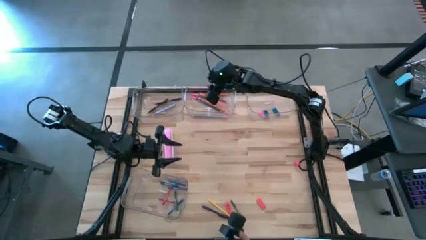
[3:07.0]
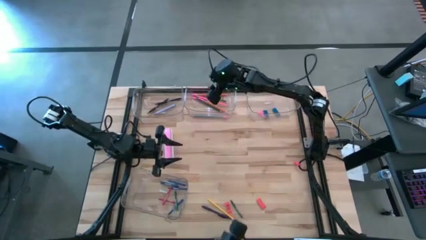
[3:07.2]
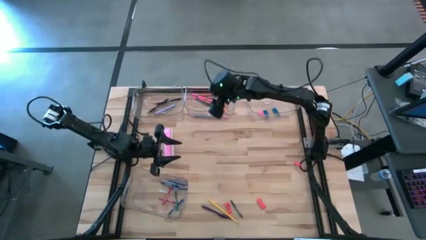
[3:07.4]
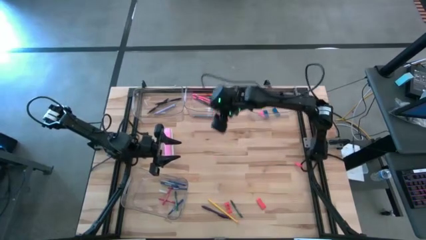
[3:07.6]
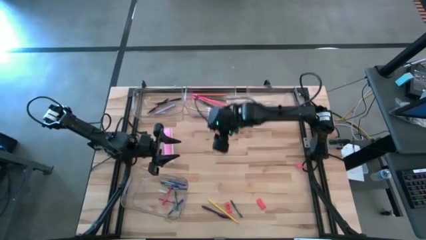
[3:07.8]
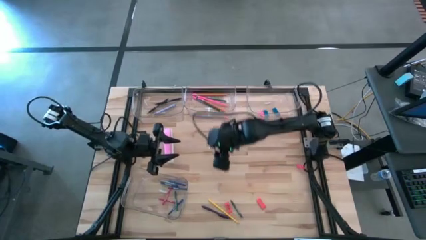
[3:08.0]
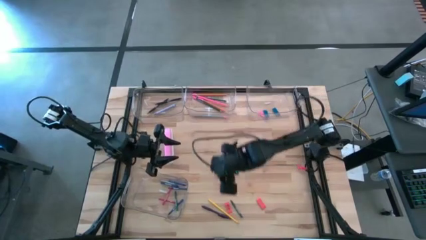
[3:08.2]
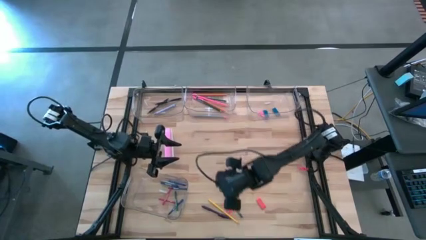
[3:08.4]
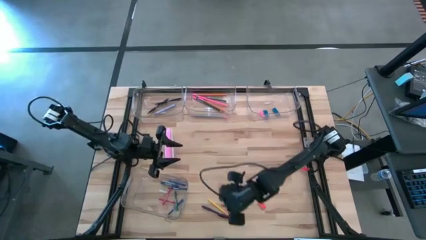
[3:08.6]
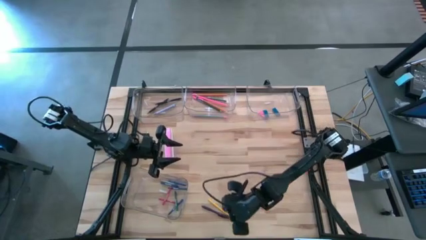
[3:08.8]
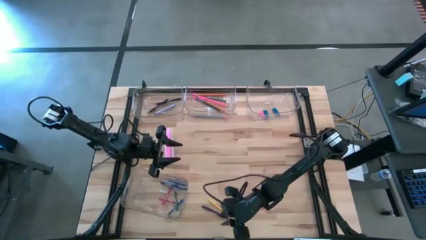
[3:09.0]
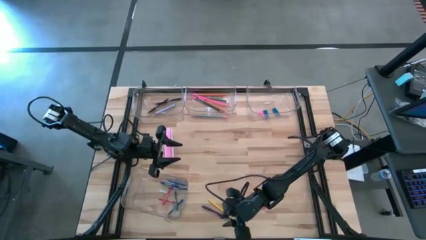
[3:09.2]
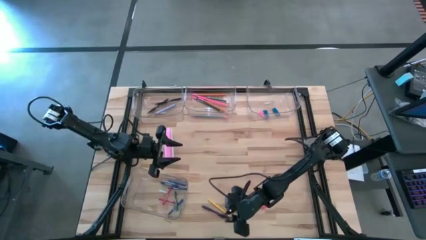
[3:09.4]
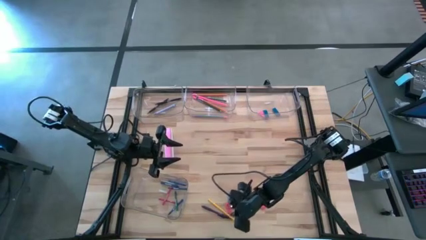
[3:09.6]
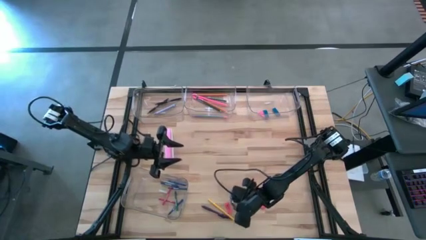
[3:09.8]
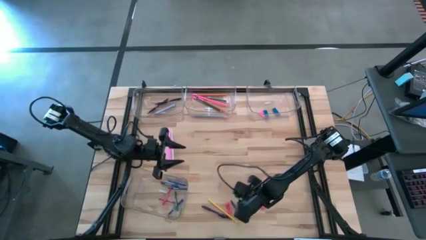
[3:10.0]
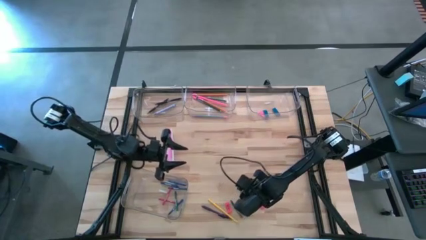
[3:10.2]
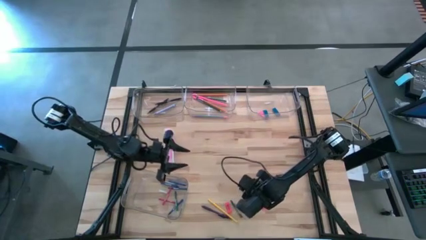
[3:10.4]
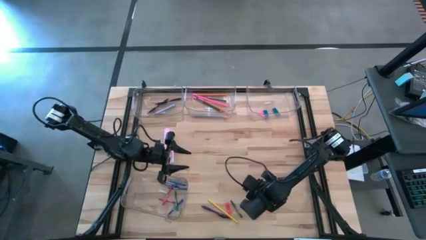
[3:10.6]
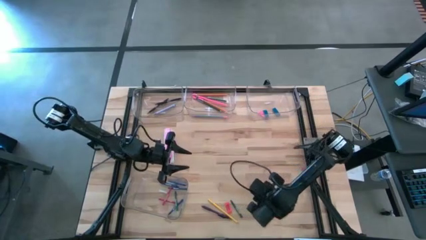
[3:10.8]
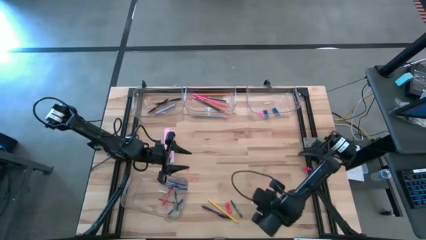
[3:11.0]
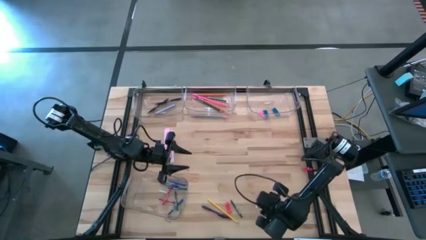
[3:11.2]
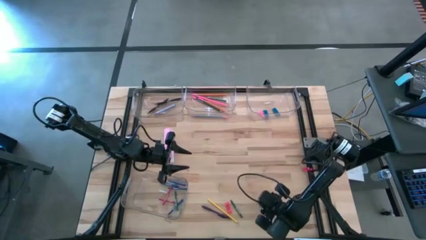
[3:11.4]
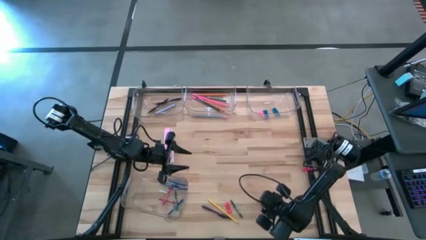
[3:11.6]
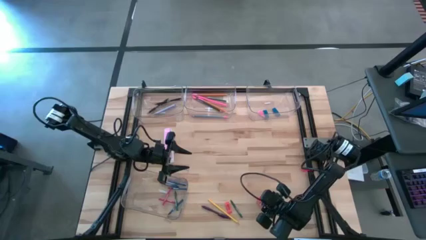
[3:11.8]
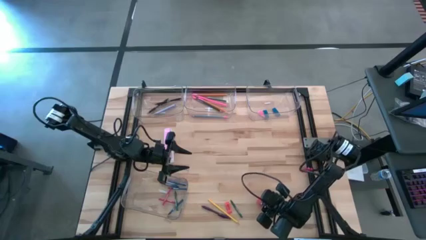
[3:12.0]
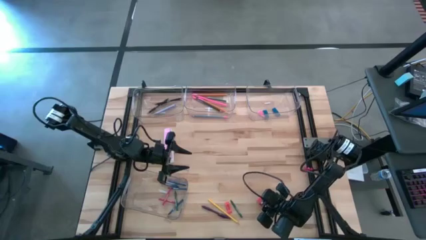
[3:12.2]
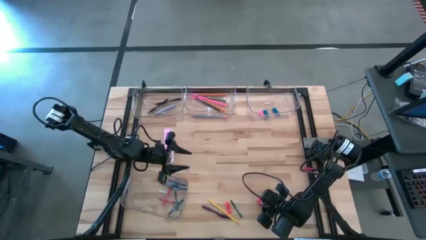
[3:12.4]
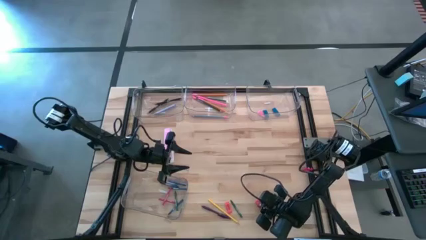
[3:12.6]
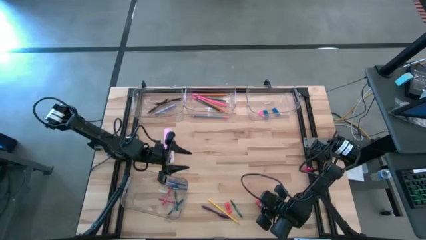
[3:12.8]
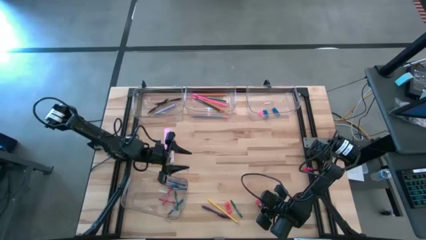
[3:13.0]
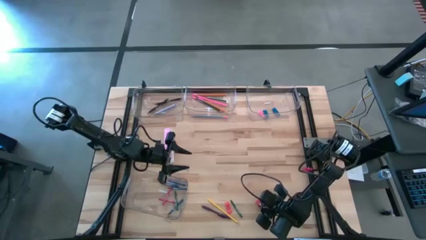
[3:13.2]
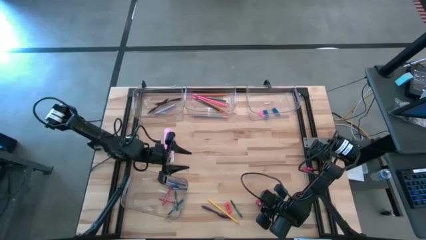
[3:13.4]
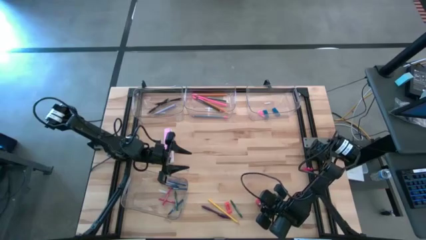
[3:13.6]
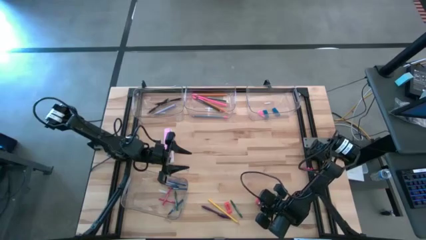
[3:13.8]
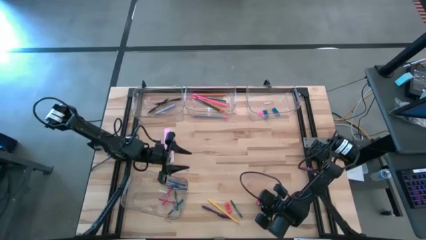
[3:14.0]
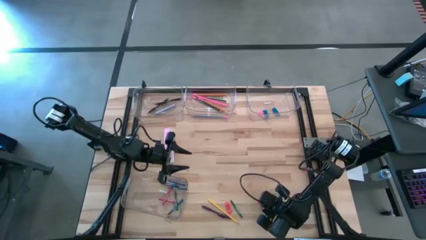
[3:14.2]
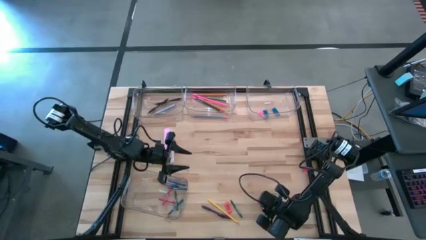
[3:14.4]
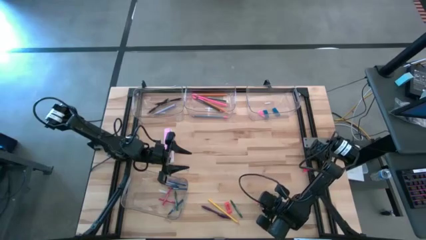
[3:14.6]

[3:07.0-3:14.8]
Task: Sort crayons/erasers/pens/pencils in bins
Put the orange eraser into the top right transparent bin

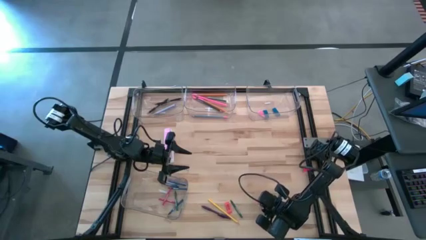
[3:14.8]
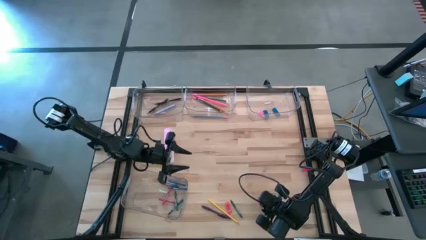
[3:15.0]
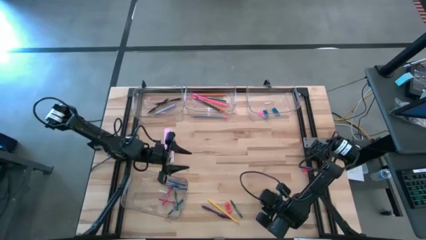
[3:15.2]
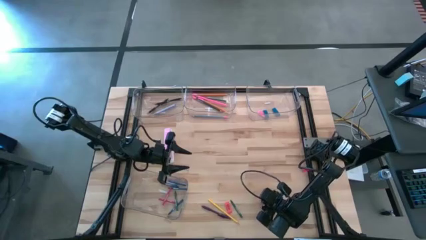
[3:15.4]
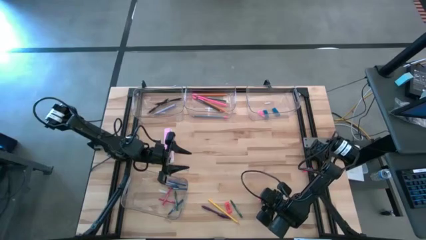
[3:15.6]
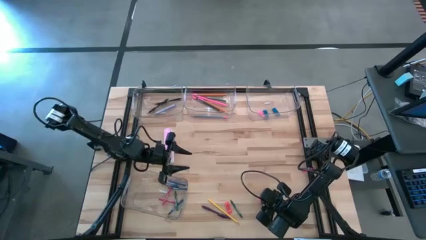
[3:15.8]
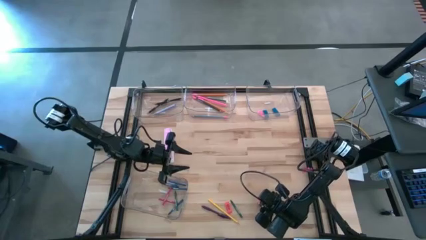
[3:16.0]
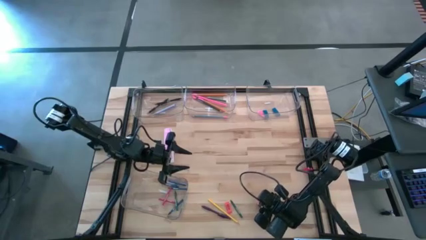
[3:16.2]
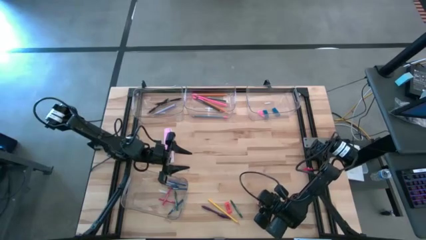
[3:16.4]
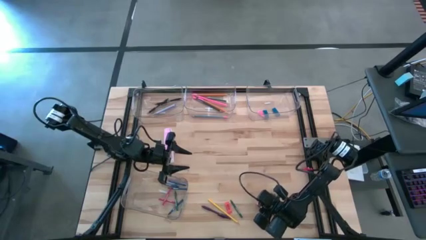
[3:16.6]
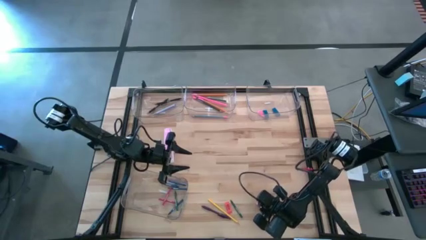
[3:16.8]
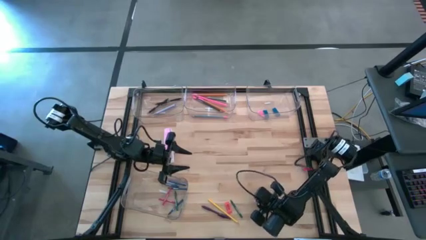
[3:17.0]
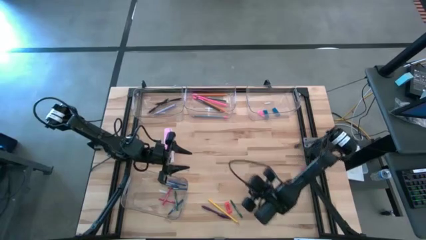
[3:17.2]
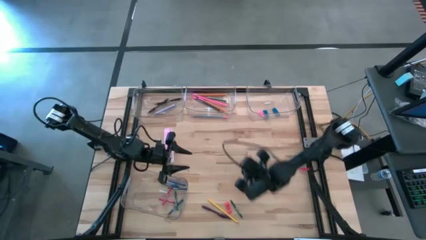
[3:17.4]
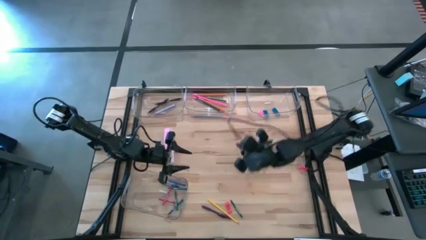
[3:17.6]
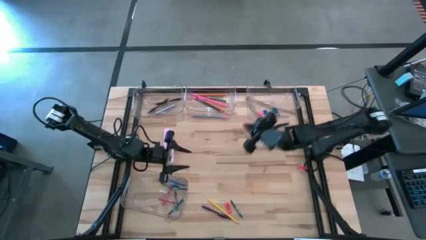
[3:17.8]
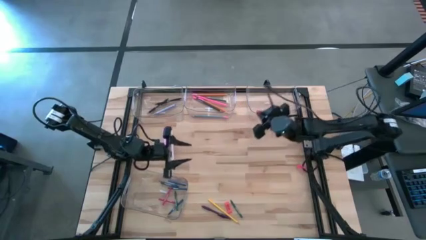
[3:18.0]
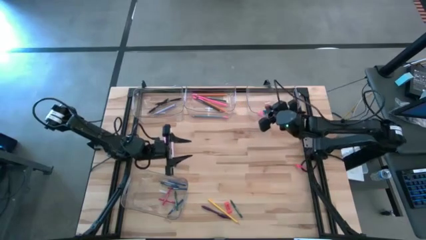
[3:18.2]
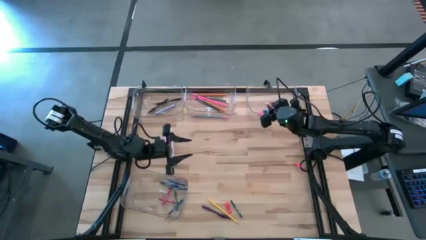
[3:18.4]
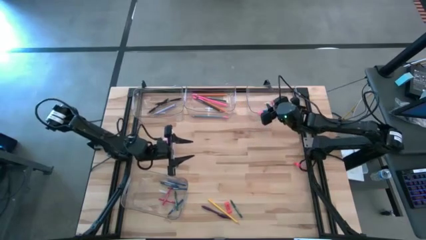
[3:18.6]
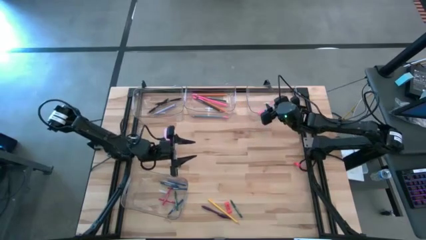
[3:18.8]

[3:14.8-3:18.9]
Put the orange eraser into the top right transparent bin
